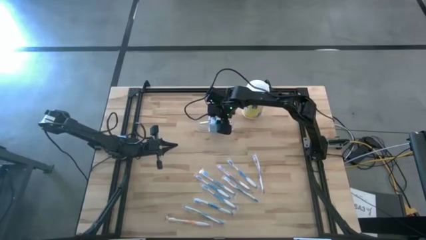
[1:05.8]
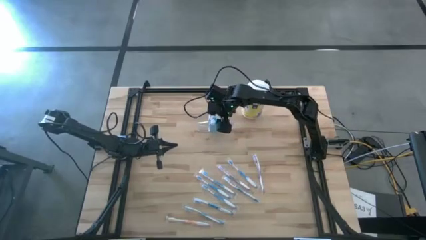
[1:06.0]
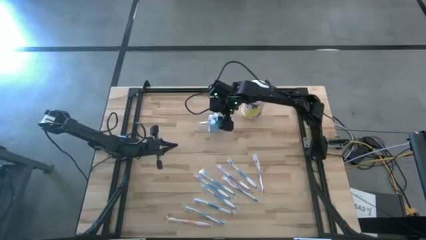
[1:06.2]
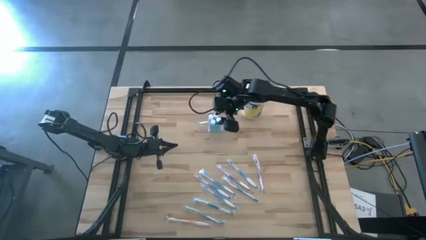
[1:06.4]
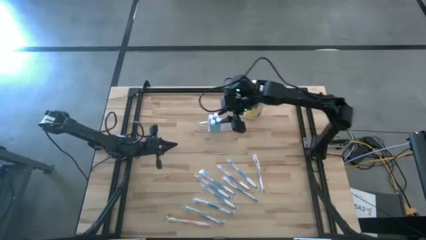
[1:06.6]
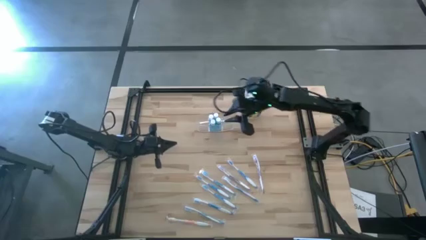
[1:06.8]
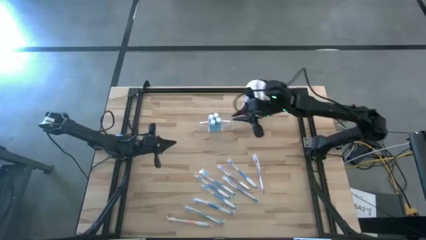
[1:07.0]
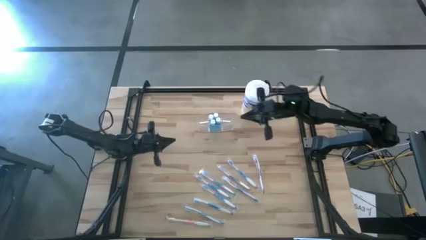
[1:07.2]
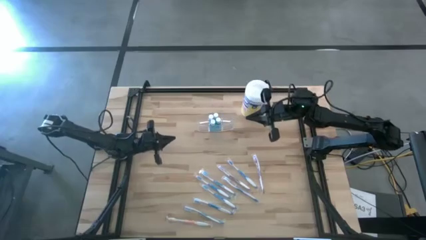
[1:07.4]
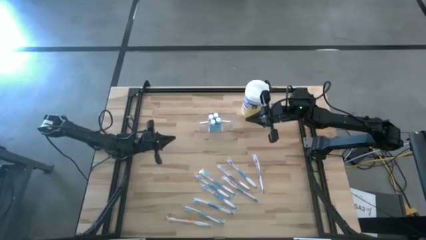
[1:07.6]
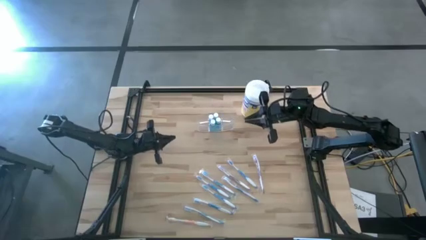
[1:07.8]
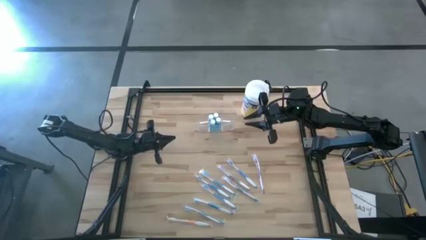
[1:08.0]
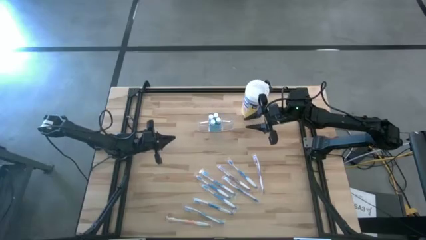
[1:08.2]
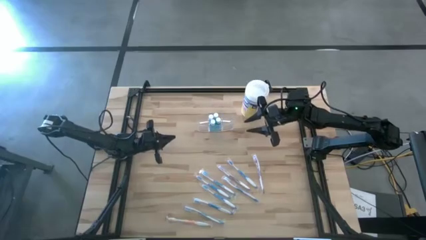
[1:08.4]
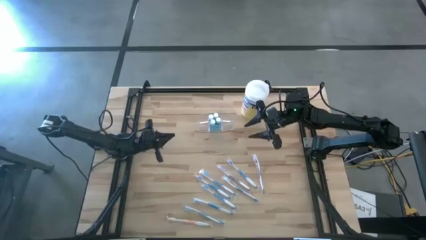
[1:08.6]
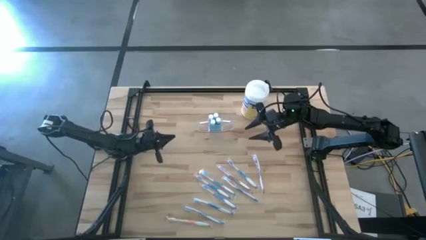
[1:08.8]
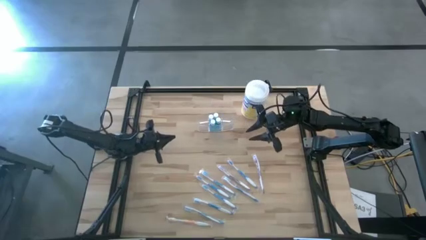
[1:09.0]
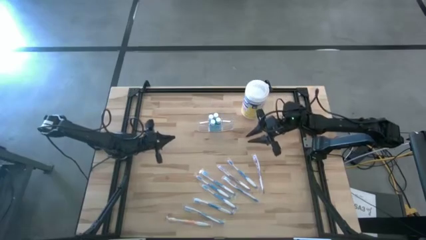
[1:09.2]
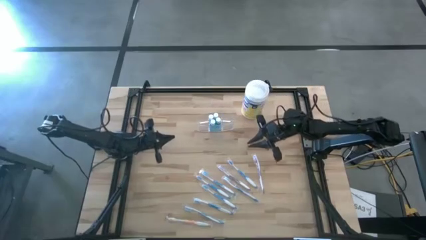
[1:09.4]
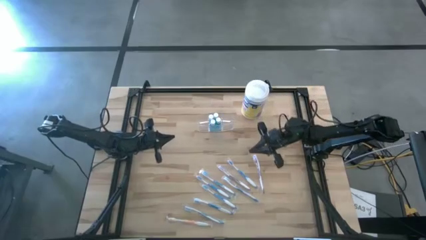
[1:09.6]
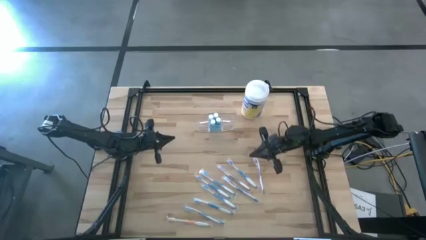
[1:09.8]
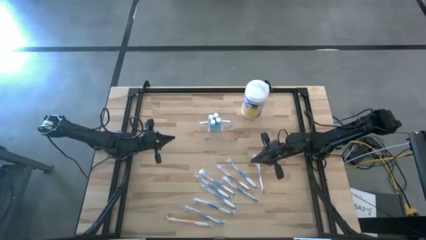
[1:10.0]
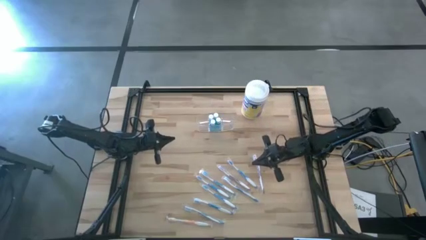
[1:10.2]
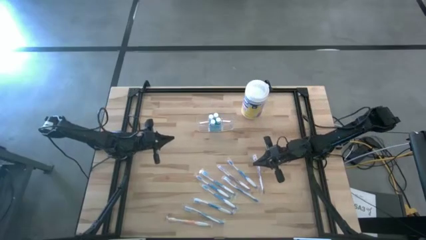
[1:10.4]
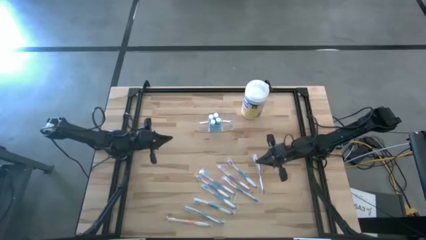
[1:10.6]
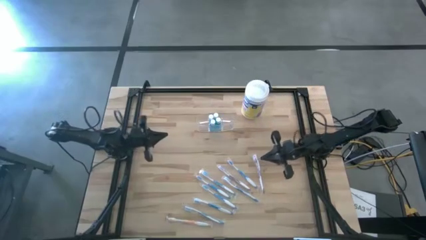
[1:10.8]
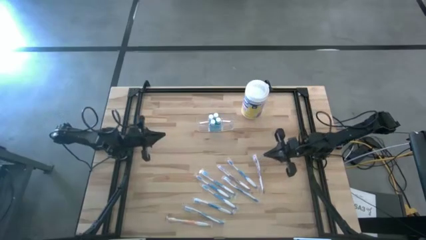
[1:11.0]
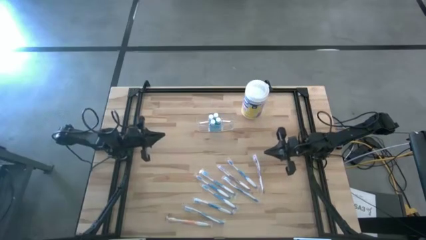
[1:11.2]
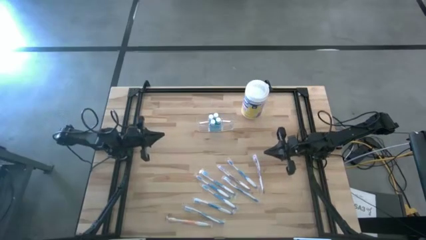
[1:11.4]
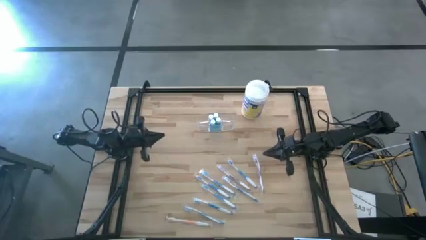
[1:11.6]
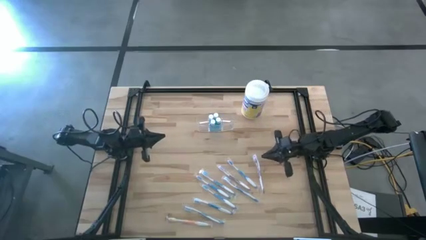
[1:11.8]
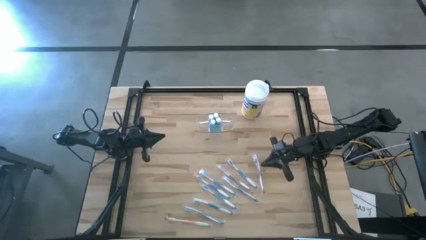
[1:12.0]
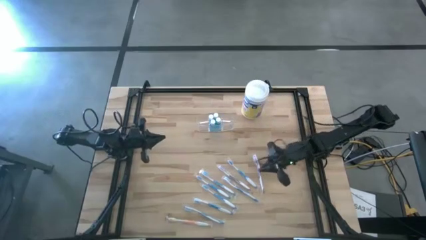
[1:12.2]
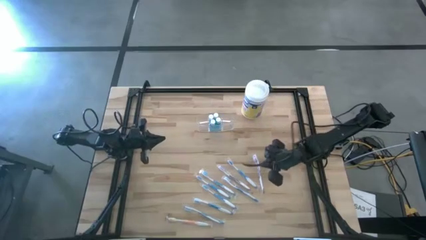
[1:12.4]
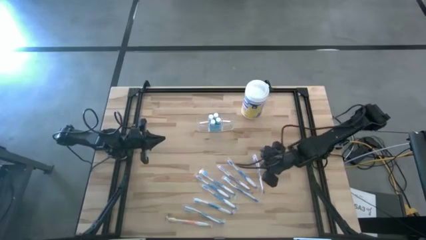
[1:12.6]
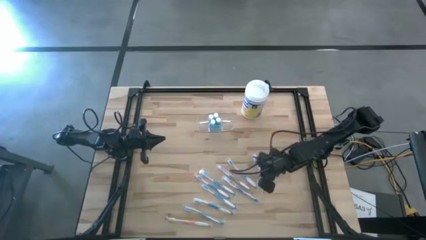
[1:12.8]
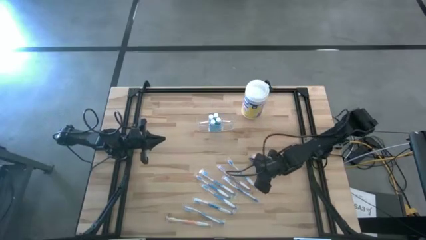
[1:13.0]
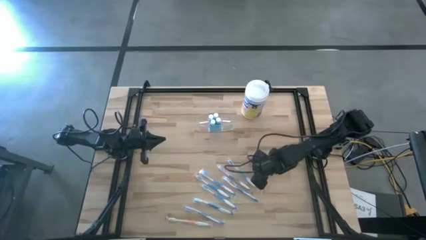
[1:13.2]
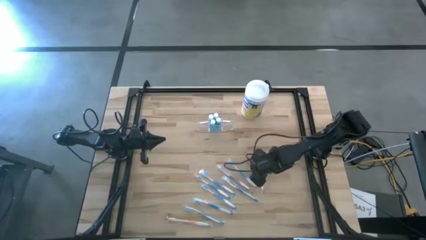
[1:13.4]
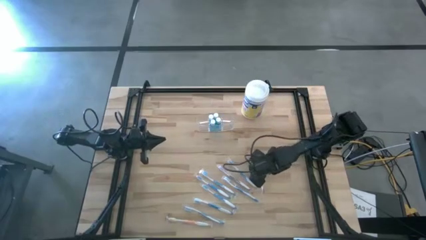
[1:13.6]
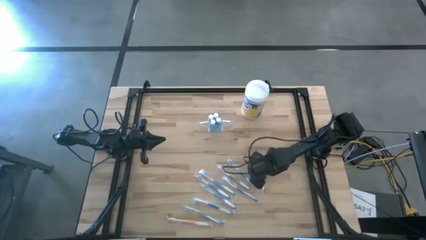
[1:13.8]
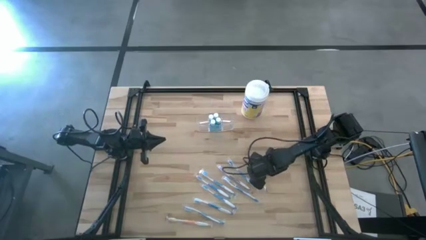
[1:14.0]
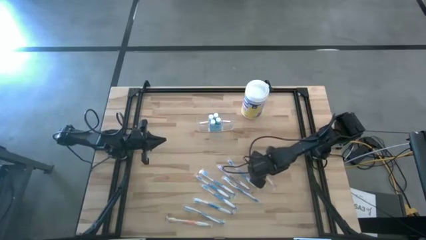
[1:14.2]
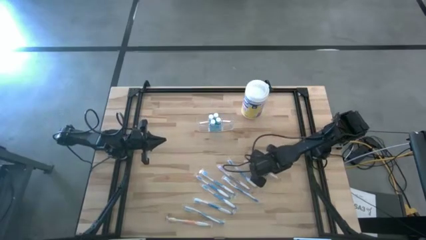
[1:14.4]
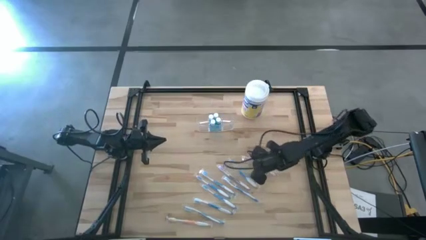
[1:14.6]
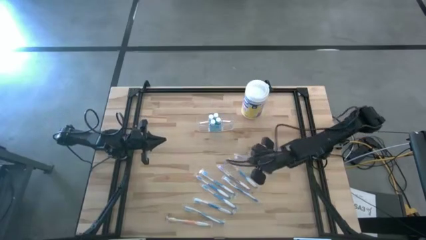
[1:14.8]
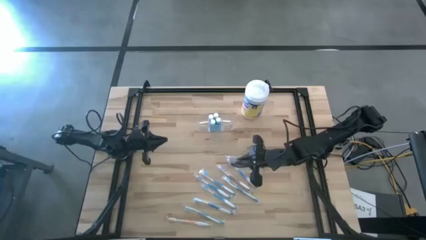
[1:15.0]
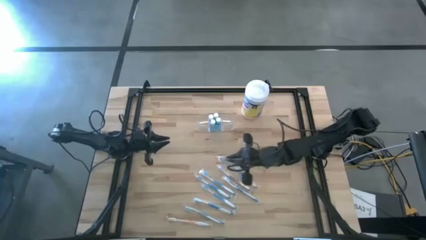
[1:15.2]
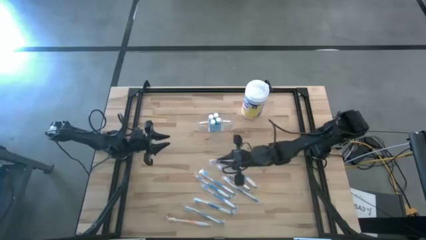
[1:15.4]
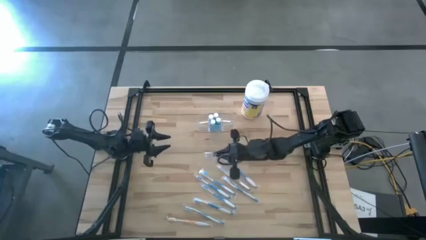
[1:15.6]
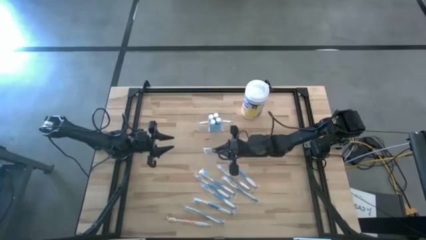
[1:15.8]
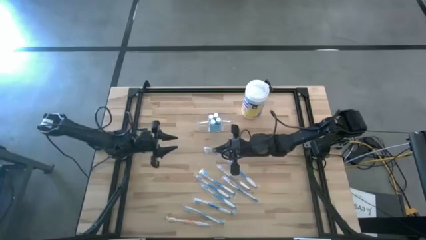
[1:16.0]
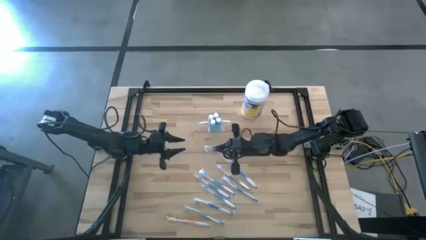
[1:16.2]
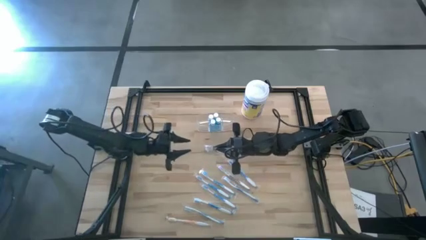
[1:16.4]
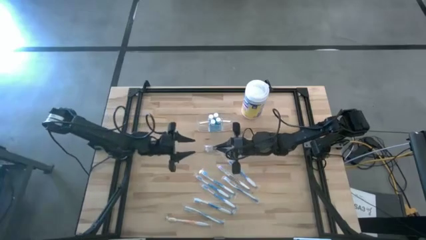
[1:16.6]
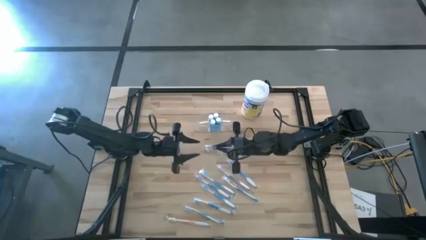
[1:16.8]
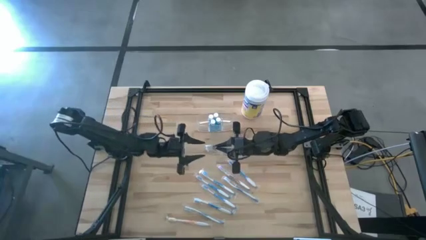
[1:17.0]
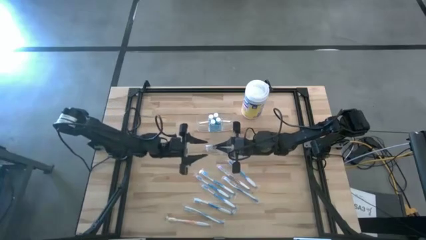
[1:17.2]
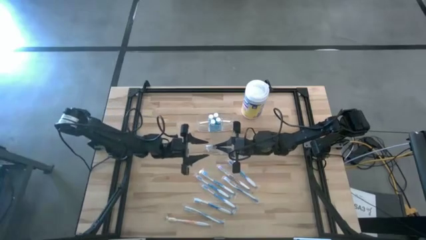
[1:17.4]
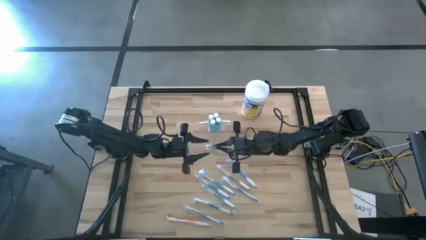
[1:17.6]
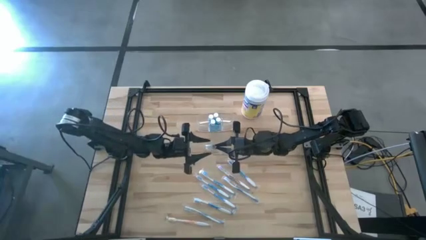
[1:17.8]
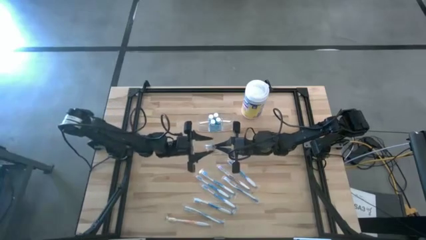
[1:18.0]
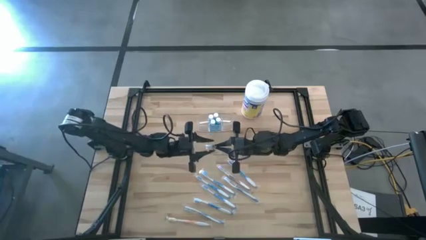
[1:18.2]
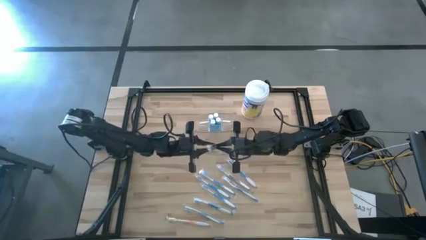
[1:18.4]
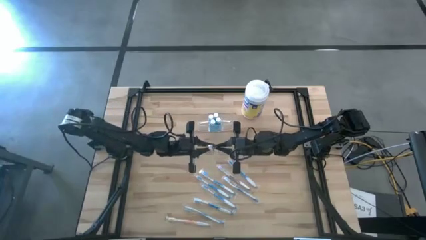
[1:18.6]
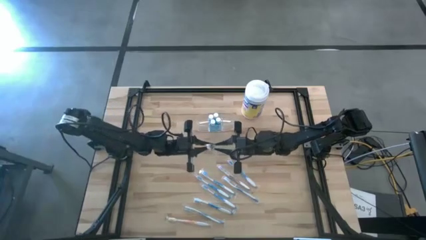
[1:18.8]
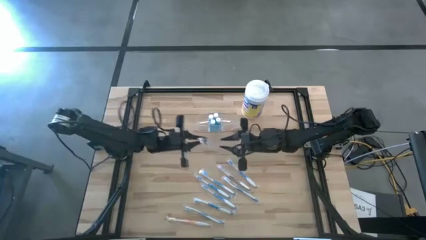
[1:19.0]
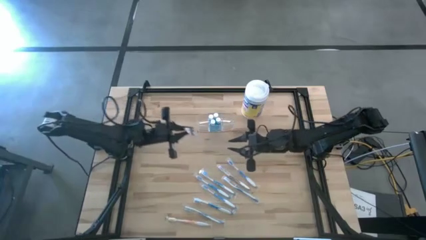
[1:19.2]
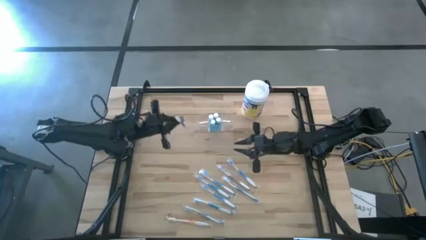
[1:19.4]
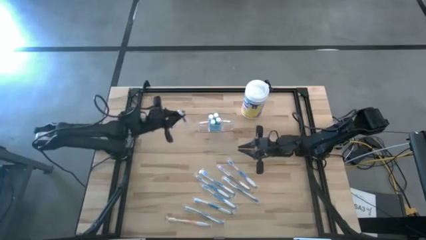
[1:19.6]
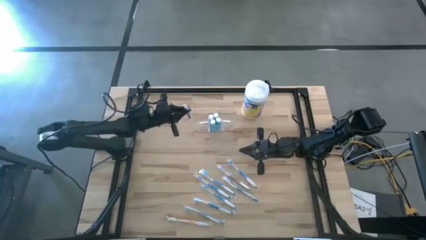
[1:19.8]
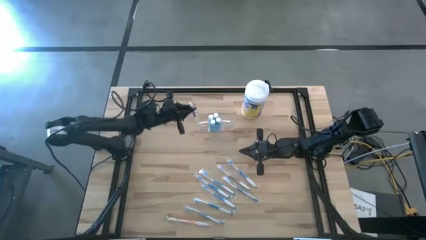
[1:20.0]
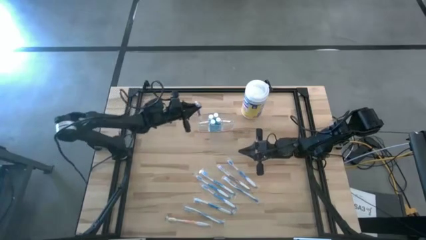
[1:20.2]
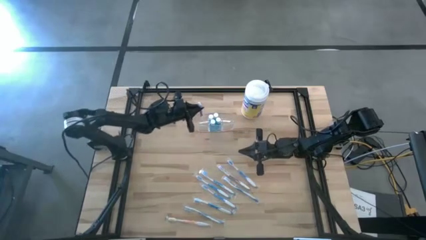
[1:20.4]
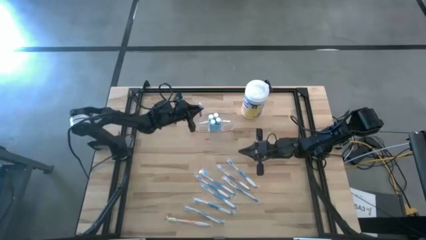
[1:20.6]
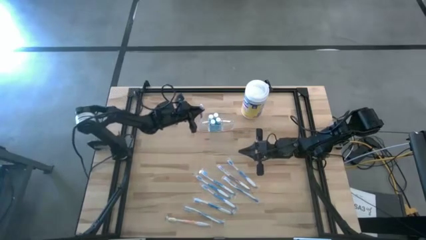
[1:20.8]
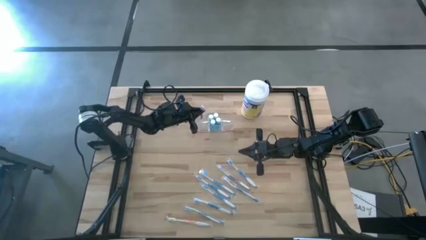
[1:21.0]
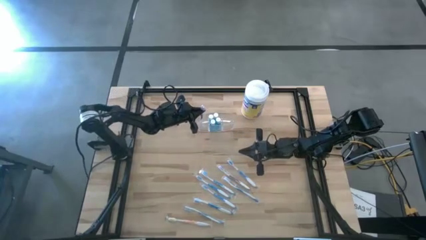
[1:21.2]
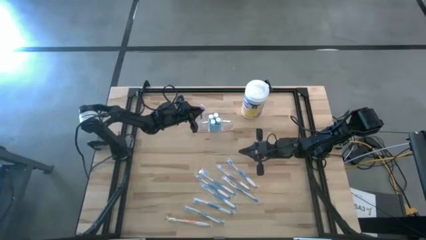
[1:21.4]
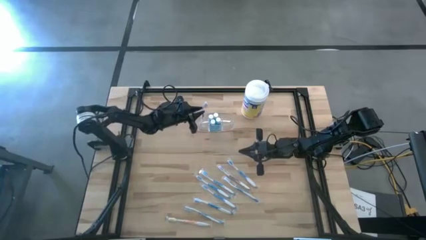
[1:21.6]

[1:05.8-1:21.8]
Task: Pick & Place toothbrushing station
Put the purple toothbrush into the left section of the transparent organizer

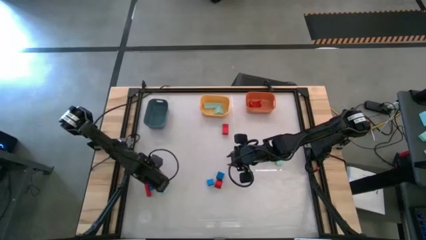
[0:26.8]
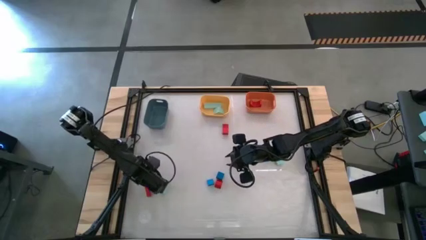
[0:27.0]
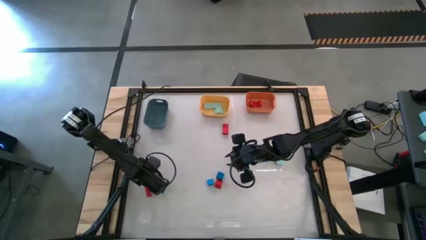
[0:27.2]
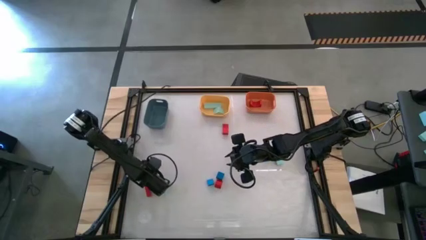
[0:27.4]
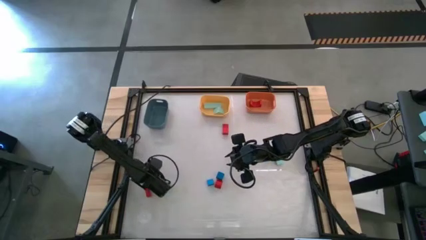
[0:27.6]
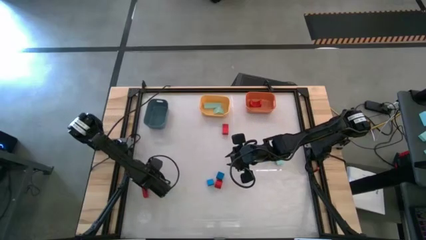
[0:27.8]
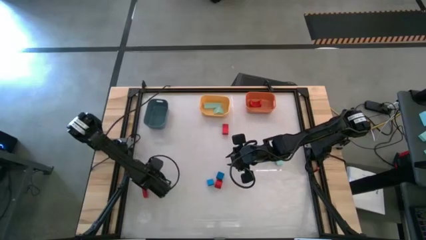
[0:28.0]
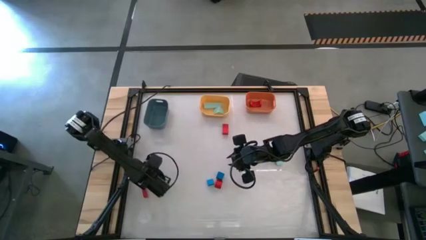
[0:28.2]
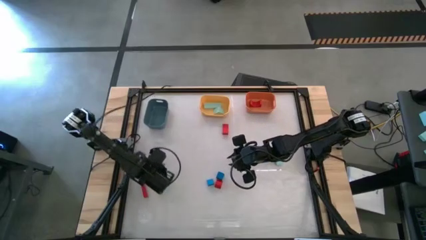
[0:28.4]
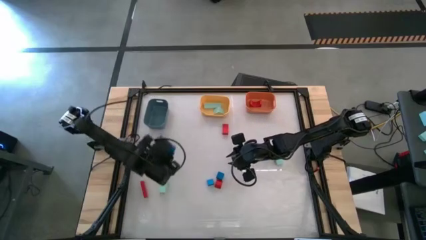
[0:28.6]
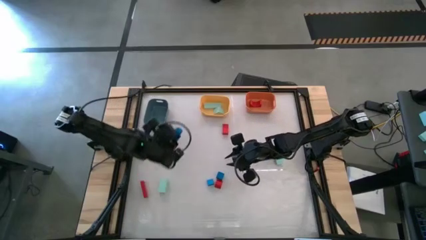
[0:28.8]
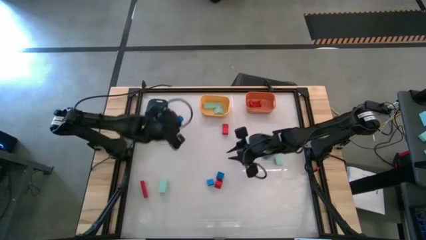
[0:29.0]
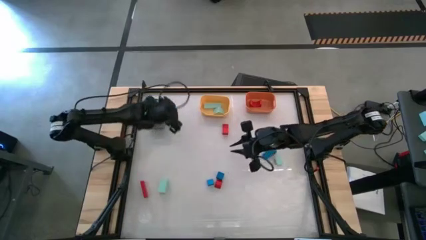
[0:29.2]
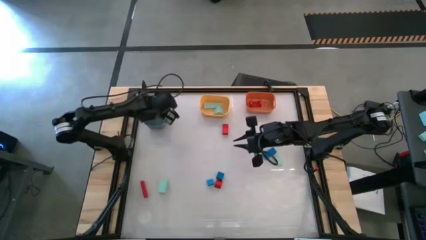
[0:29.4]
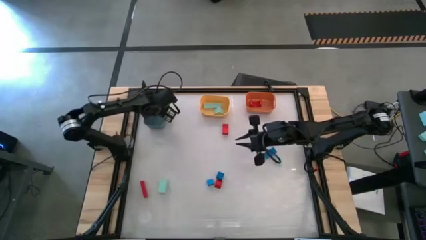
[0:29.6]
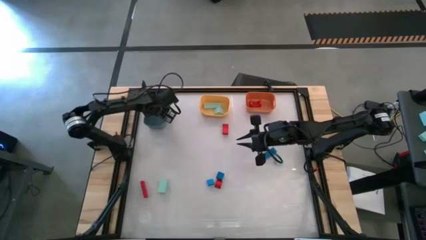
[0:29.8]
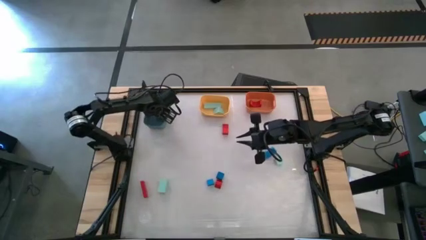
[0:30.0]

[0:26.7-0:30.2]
Task: Sort & place blocks by color
Put the blue cylindrical block into the dark blue bin
